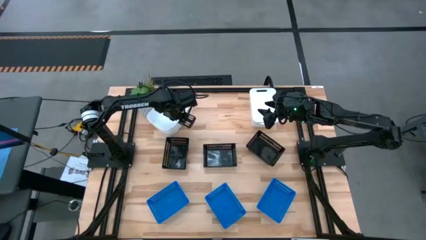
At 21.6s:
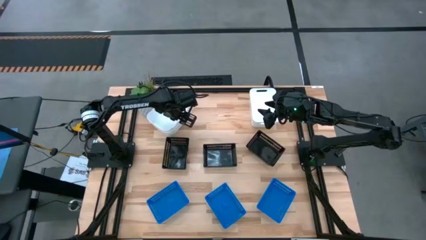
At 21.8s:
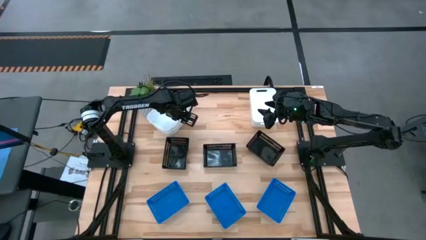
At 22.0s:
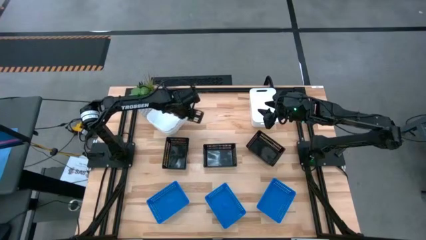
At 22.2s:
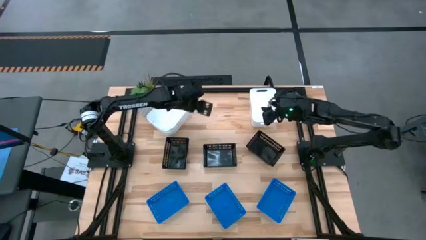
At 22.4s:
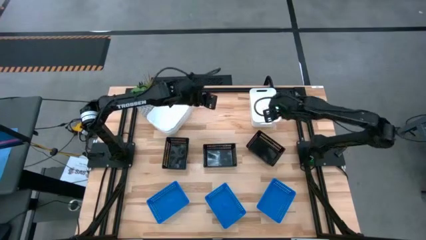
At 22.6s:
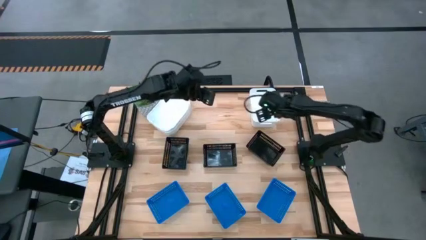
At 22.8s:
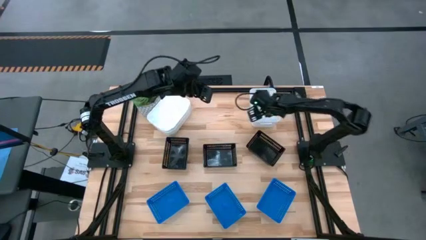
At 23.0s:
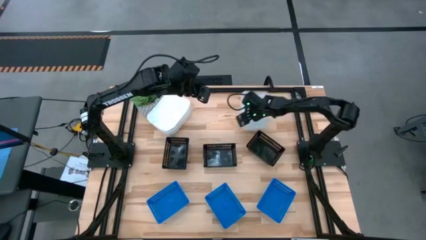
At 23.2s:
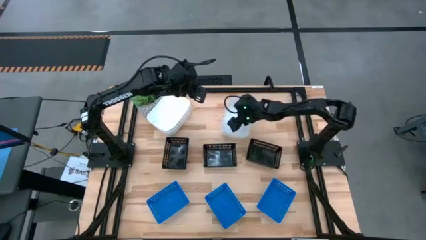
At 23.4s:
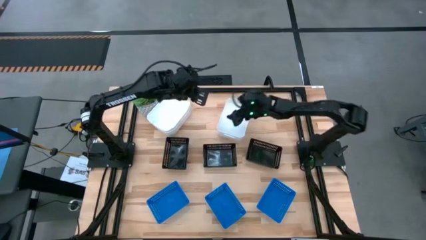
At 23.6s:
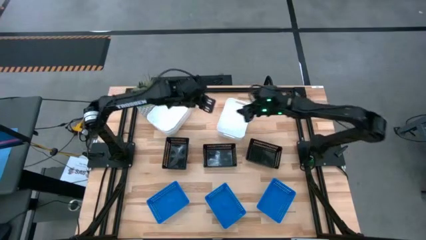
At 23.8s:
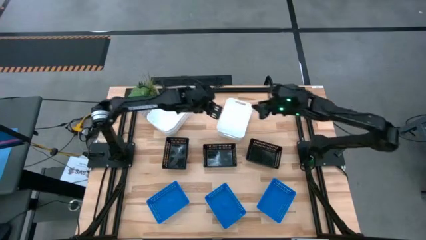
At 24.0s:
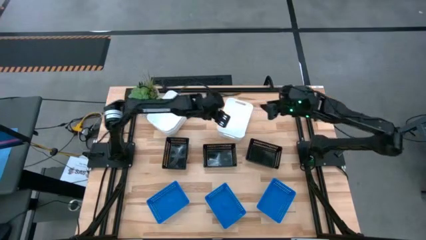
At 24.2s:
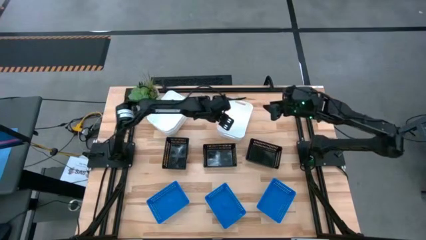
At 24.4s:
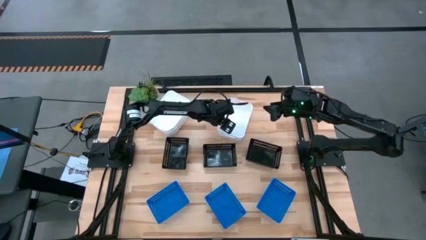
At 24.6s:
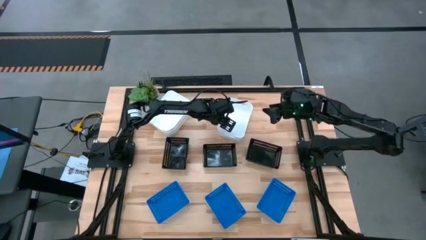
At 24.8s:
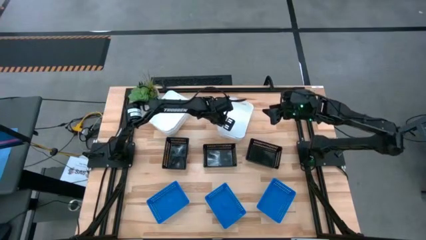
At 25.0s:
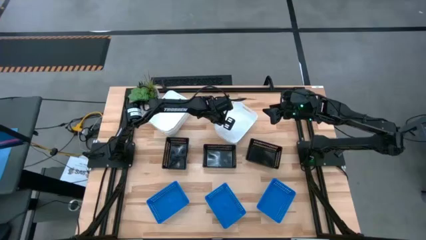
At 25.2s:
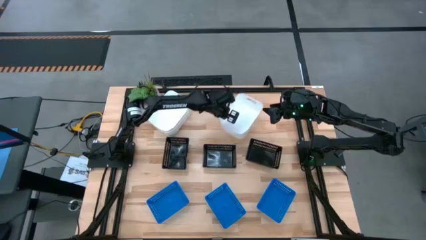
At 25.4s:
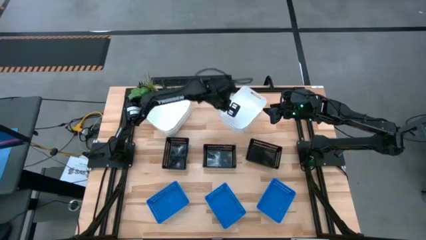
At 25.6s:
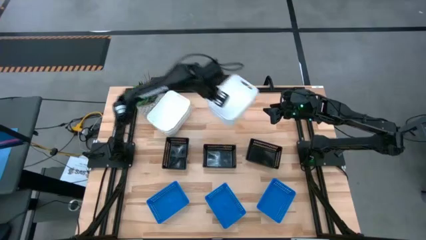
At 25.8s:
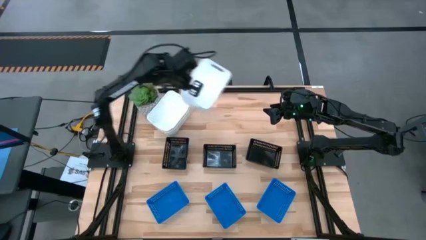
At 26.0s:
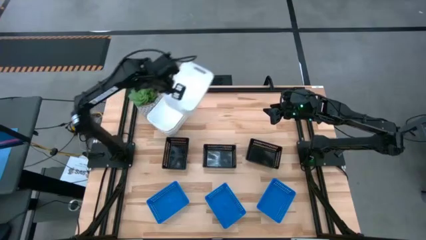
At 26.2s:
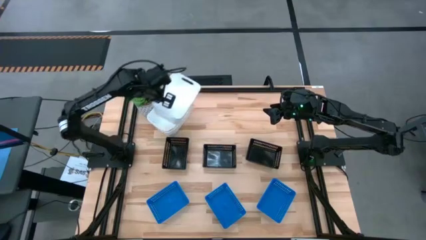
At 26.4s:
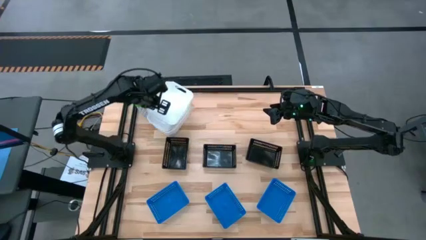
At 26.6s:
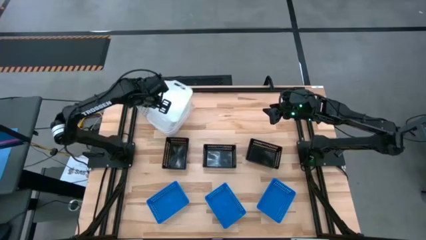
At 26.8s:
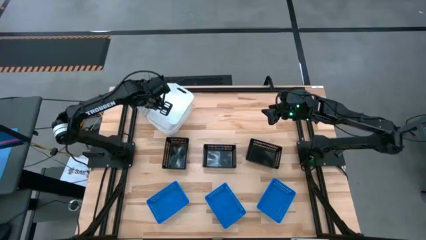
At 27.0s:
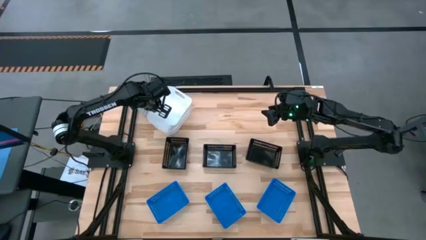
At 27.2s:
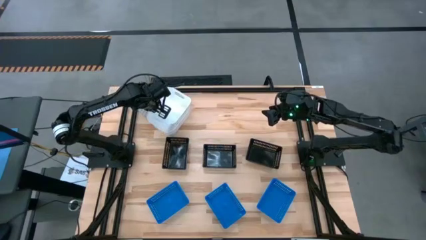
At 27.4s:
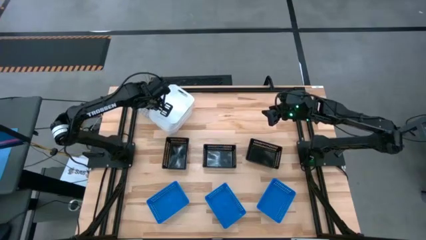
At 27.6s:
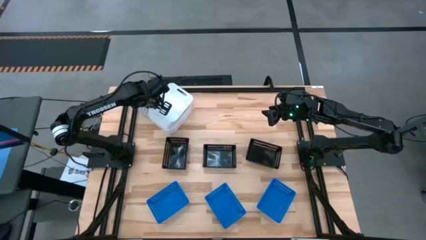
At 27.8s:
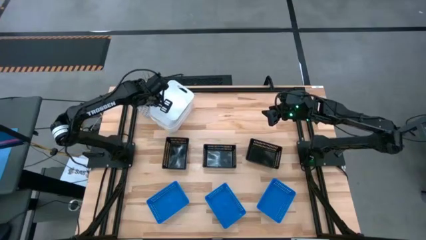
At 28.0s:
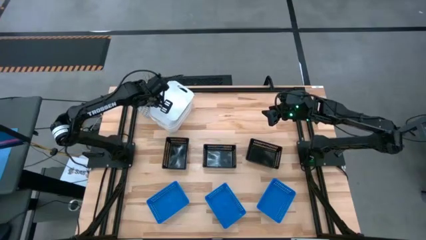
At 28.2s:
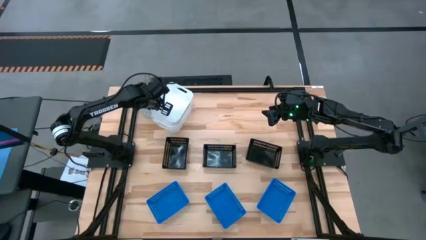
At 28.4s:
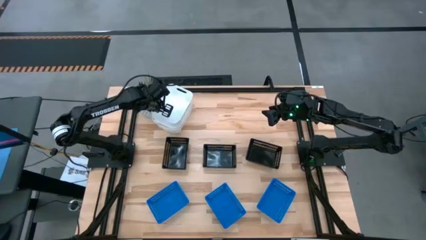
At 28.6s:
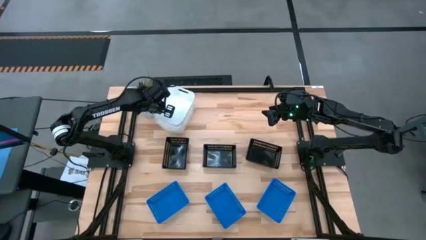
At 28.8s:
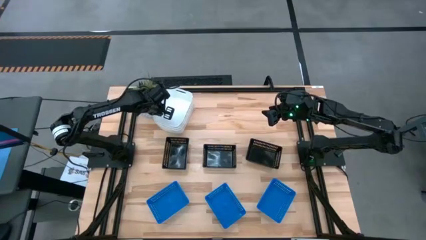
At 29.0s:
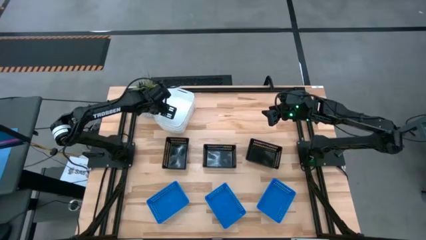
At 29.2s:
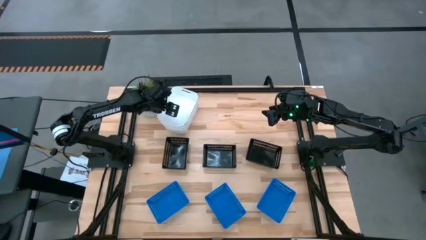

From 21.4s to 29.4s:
Stack the white bin on the white bins

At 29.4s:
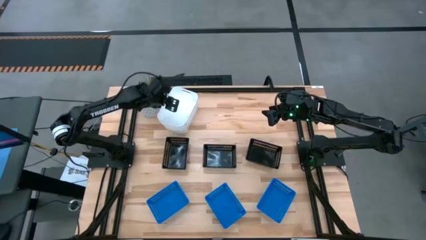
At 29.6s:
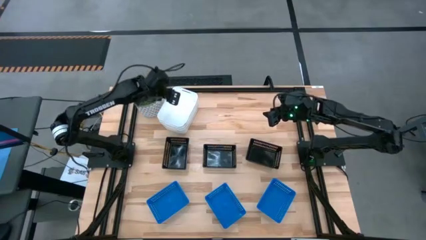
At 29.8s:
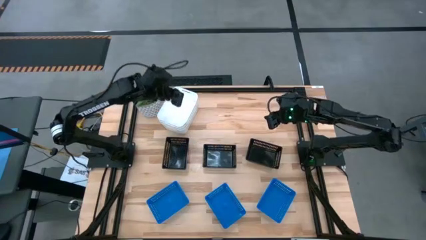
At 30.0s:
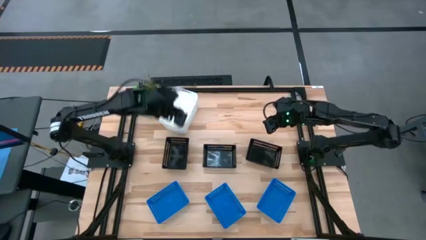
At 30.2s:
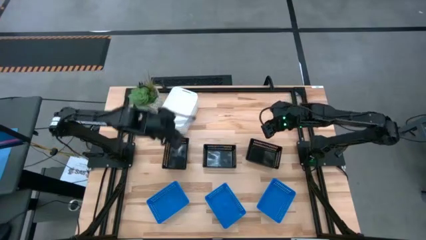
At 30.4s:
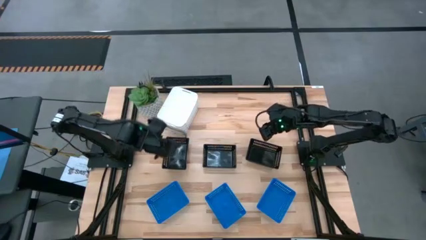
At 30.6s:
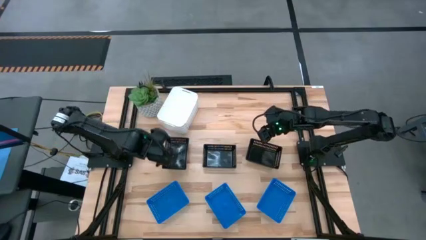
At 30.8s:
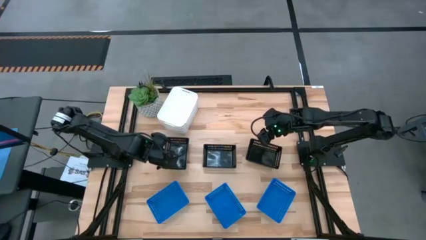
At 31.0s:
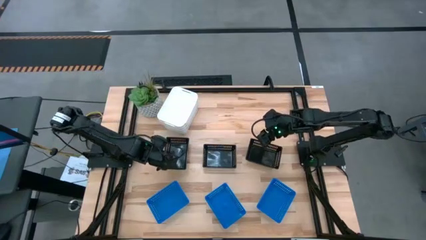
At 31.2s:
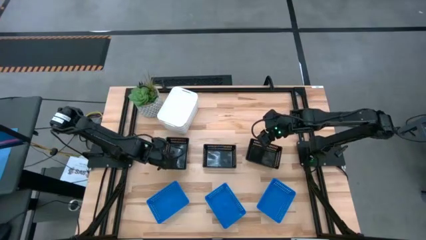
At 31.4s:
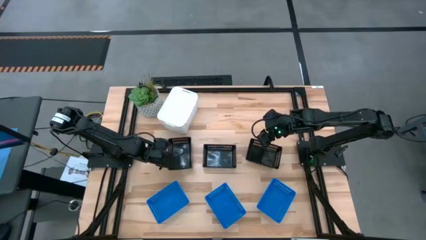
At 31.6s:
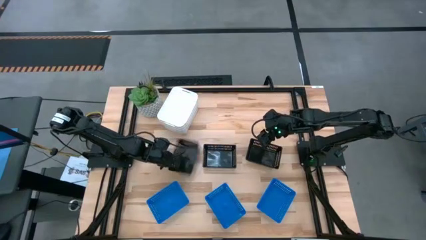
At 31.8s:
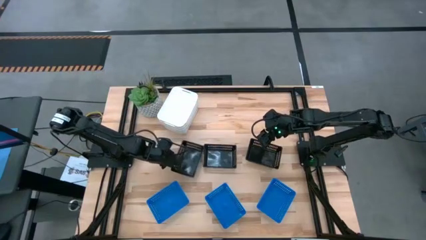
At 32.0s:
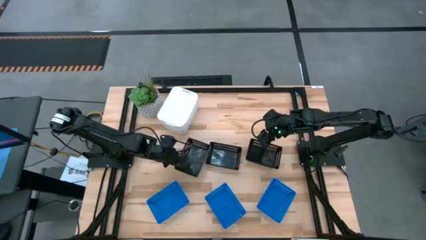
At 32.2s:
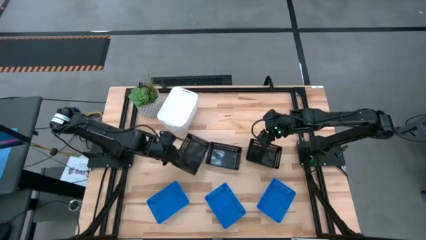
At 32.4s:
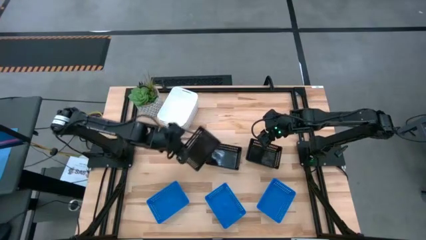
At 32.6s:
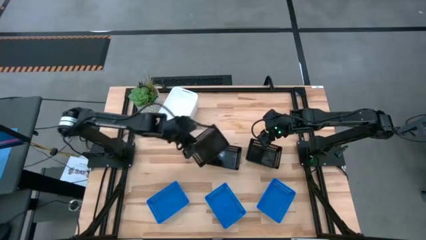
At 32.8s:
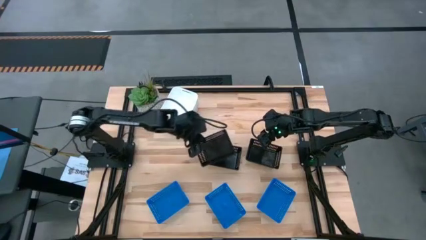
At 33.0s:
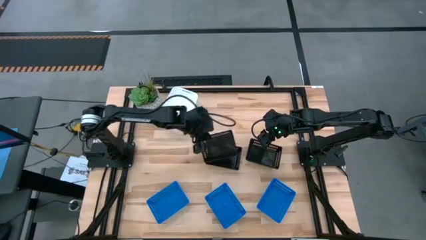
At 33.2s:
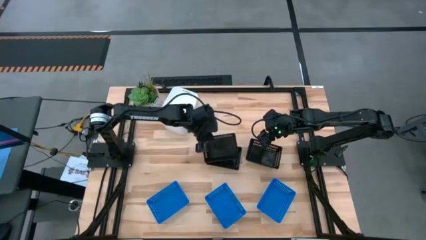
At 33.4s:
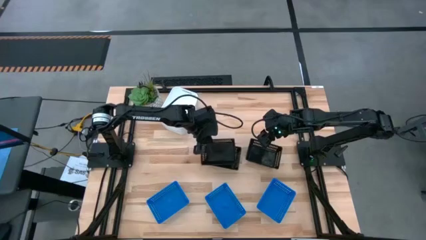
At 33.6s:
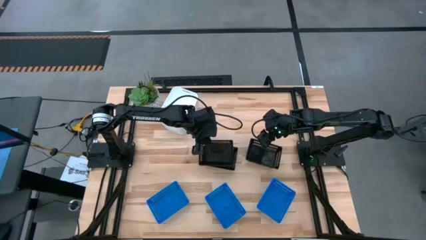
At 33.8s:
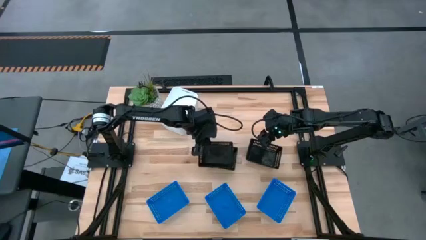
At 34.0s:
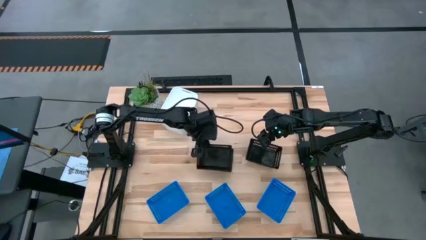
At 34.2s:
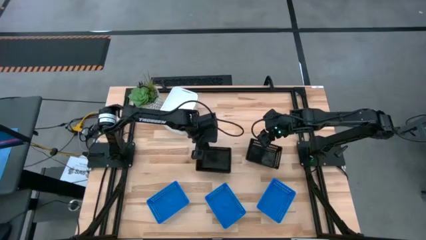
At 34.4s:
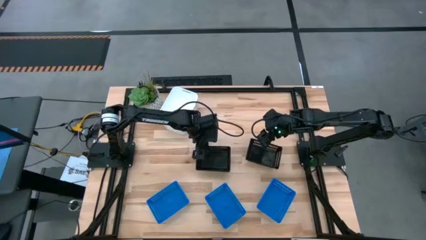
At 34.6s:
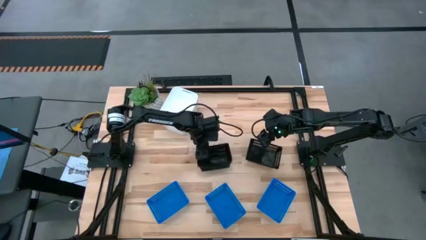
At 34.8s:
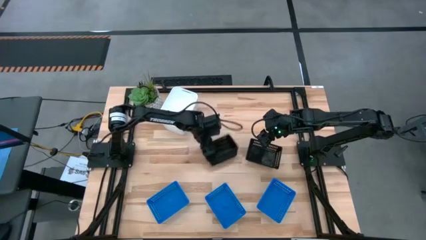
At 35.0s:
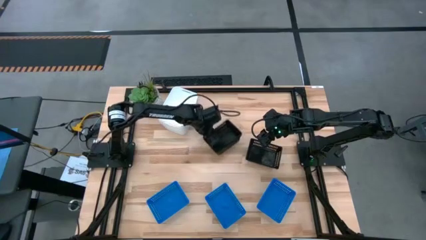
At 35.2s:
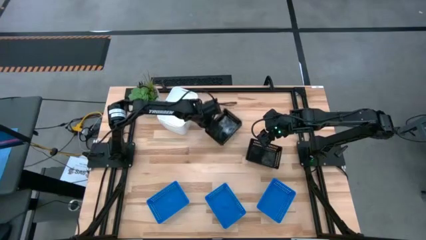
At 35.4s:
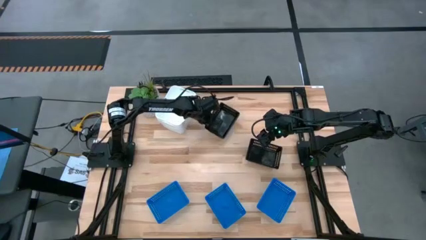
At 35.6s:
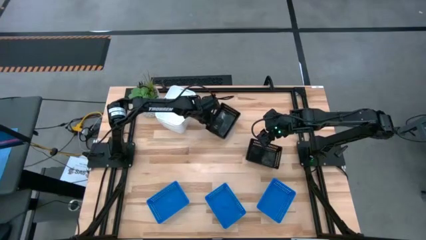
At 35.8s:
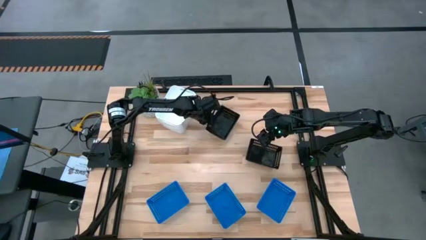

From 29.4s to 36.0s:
Stack the left black bin on the middle black bin
